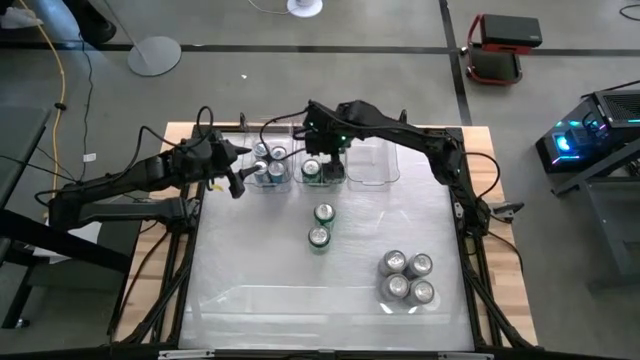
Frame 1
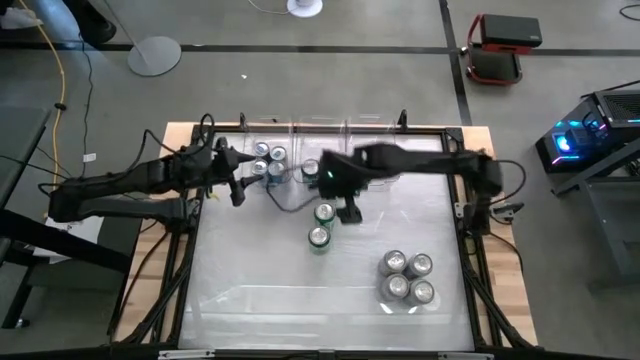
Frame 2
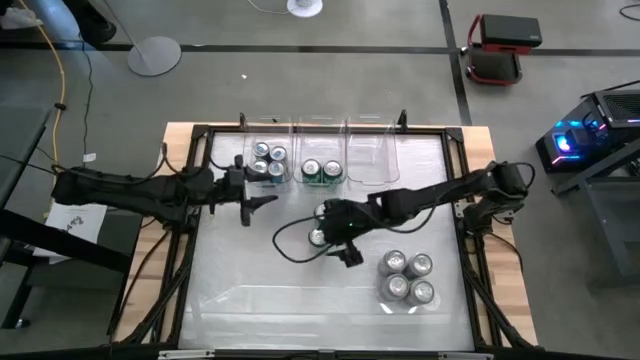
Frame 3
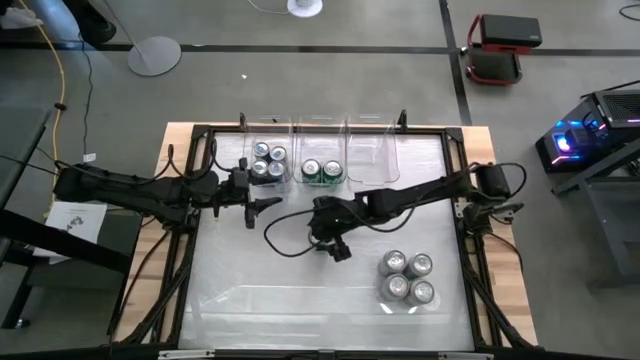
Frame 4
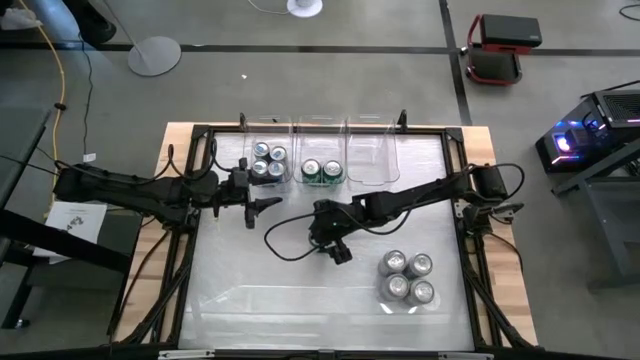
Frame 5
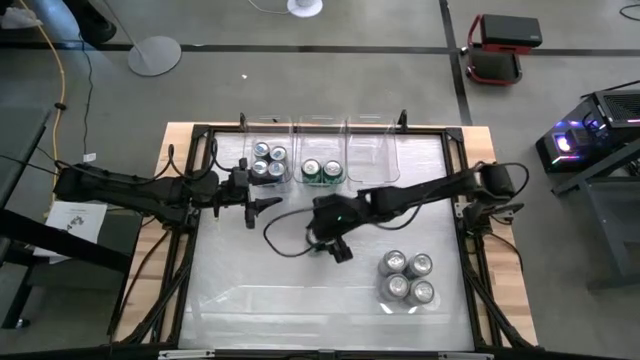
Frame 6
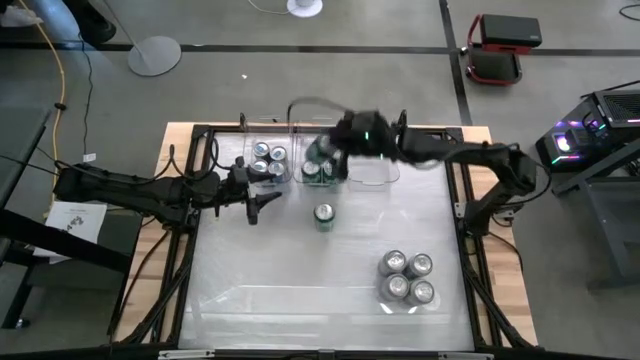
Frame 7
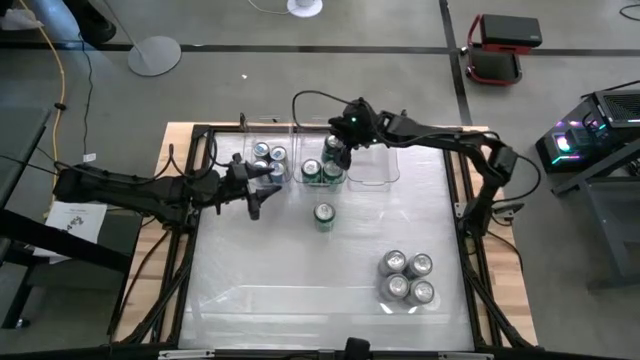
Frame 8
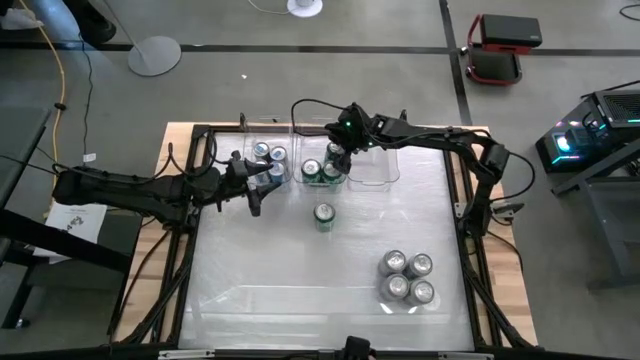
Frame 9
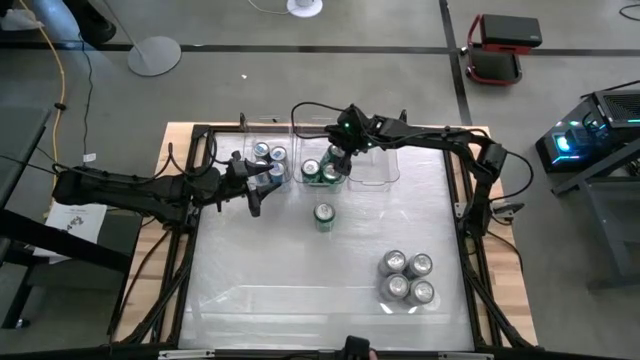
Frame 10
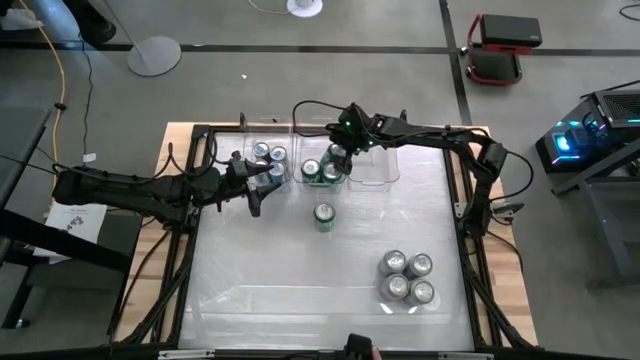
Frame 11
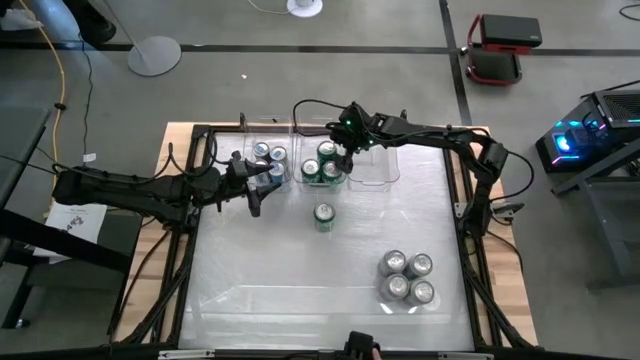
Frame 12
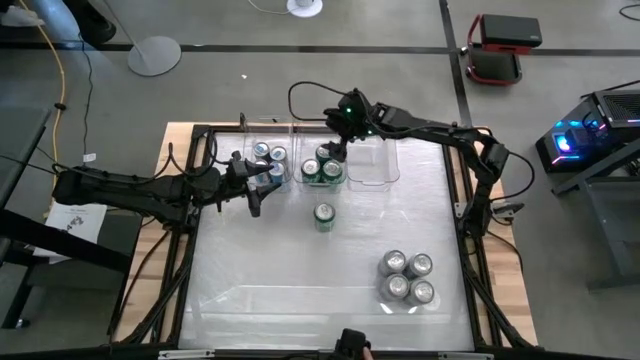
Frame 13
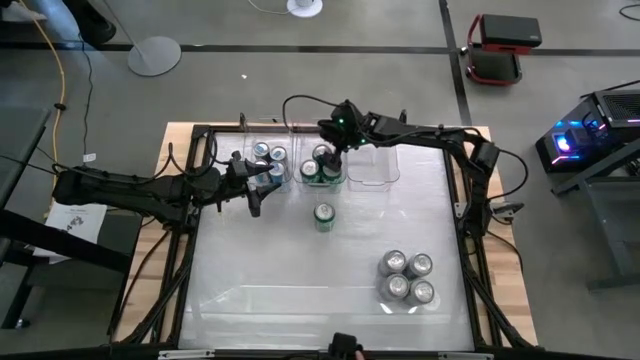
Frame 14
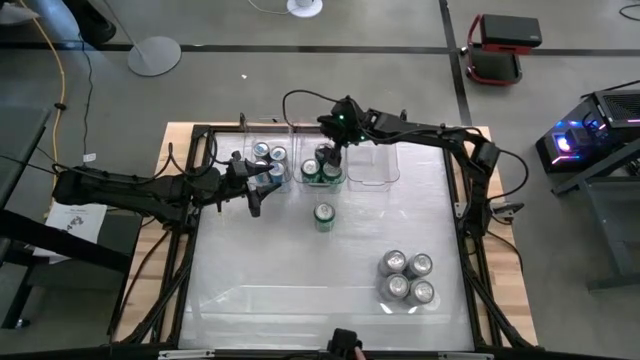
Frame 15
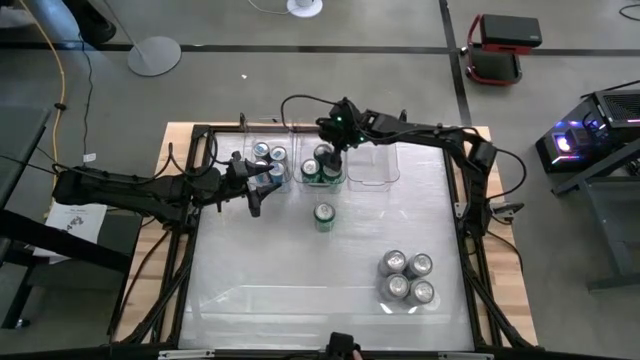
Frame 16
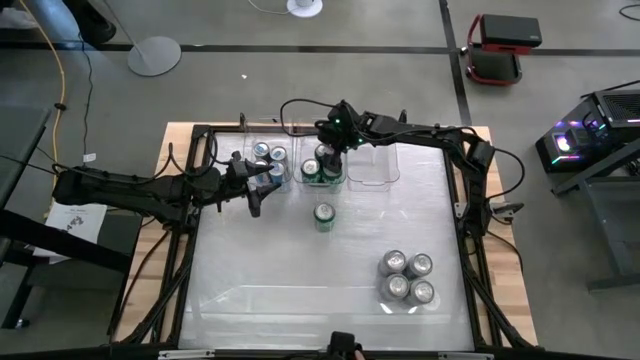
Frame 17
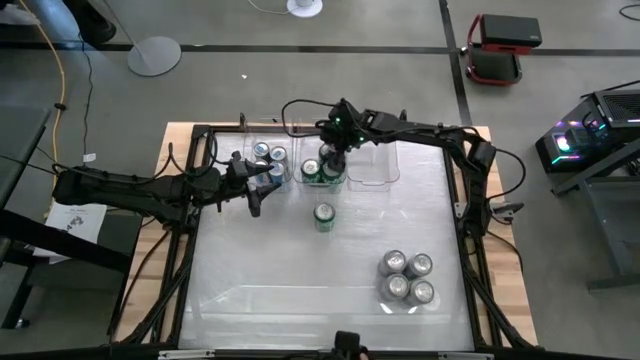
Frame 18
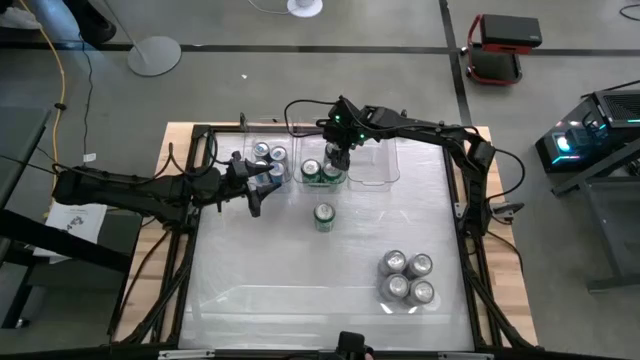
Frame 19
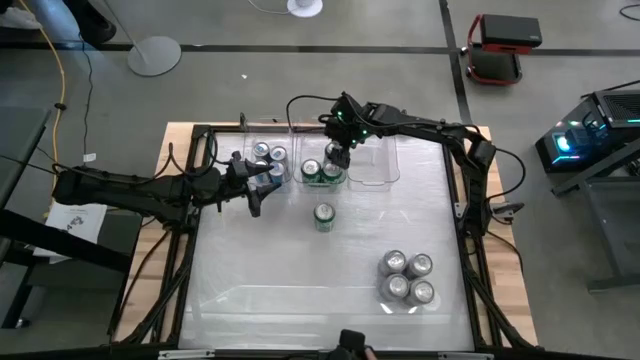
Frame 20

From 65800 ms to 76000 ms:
Task: Sort soda cans
Put the bottom green soda can into the center transparent bin

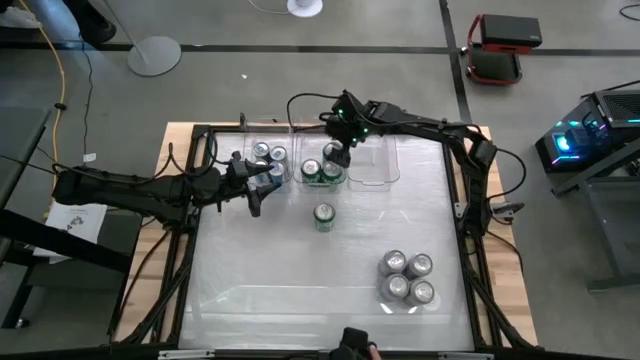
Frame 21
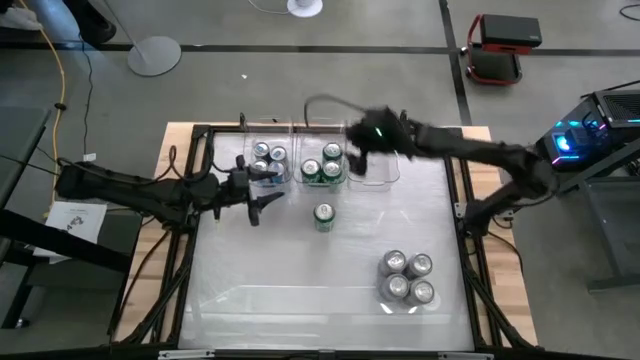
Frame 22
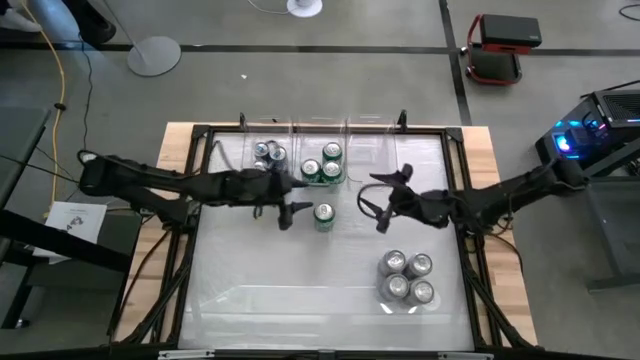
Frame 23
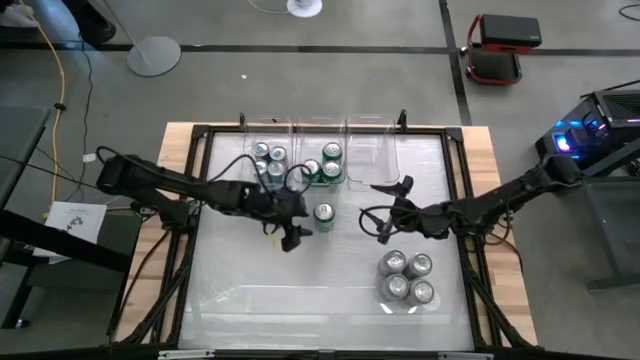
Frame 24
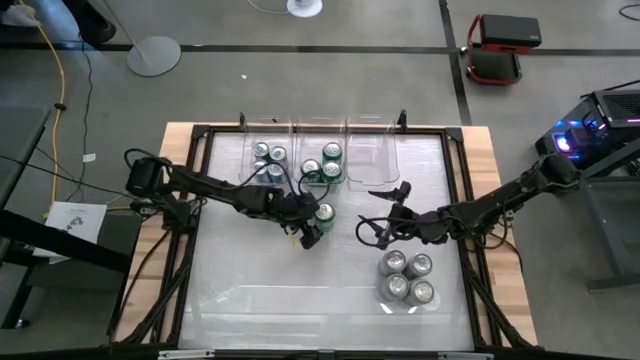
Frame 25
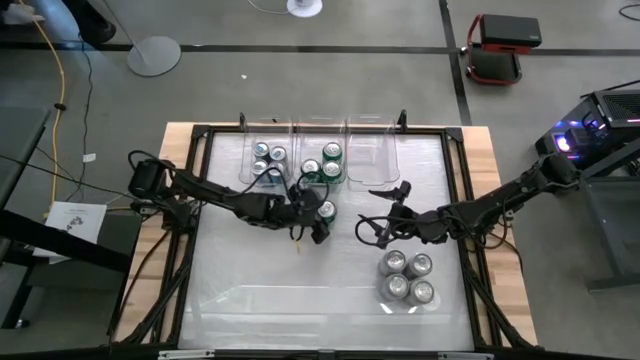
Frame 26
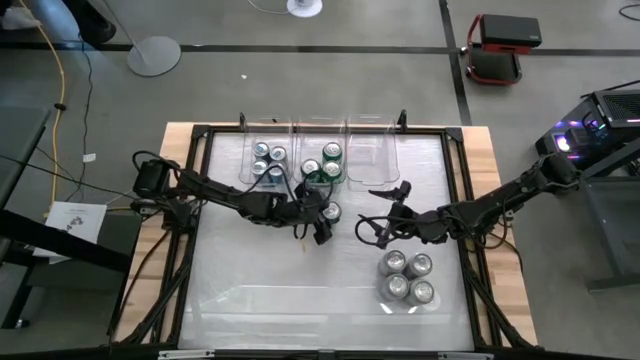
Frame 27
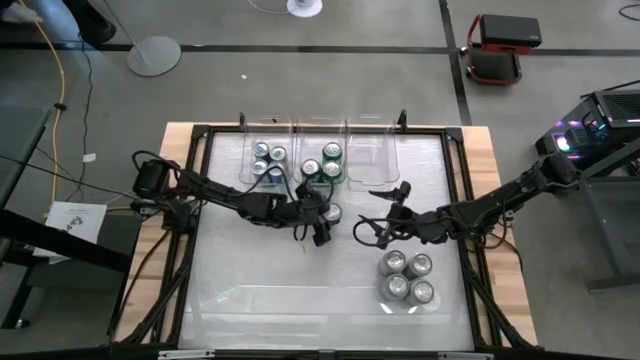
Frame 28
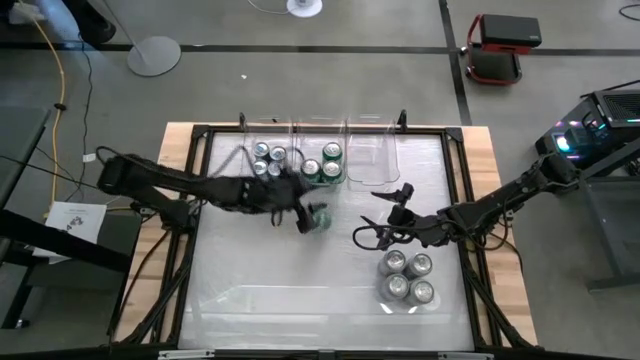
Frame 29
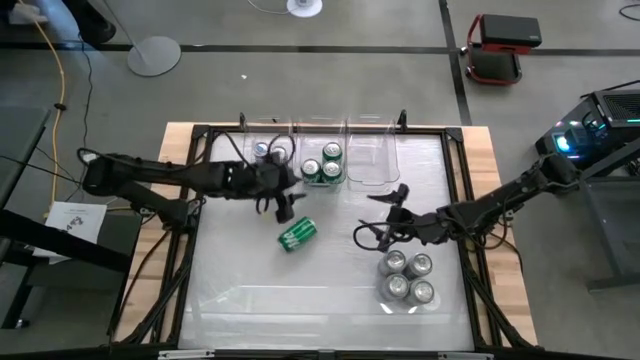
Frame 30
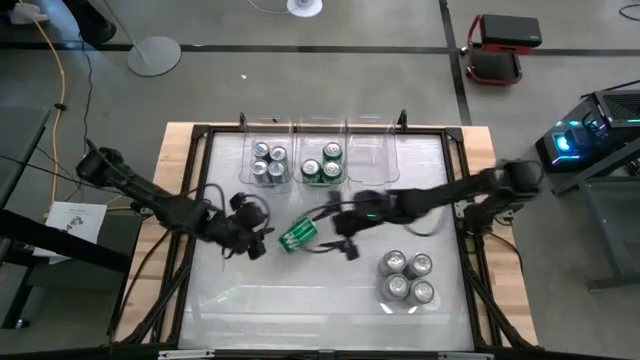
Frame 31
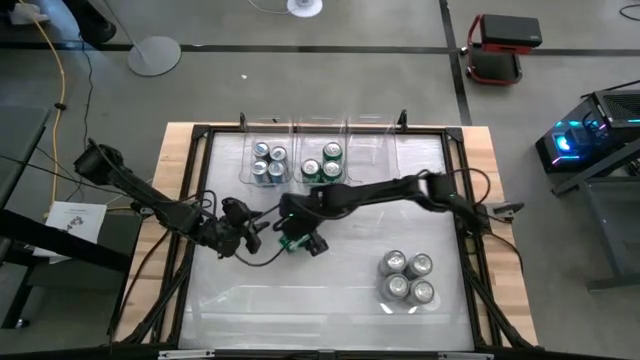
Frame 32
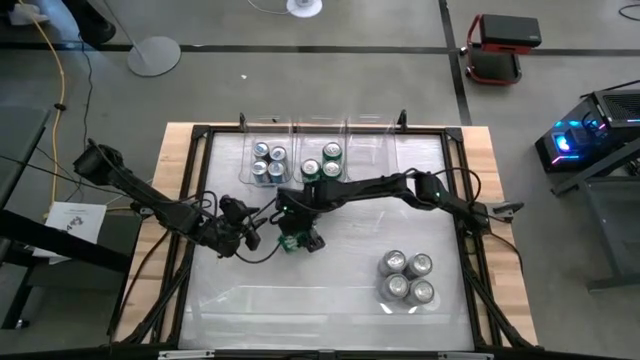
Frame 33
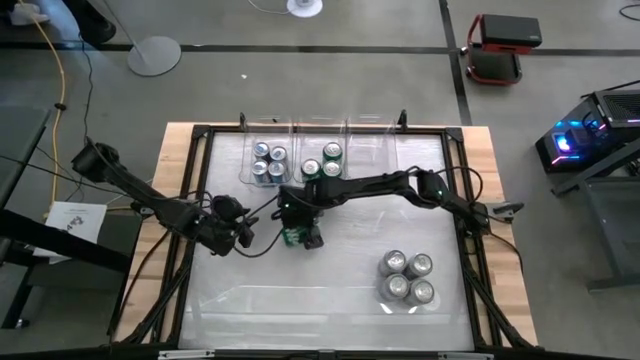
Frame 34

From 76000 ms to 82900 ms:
Put the green soda can into the center transparent bin

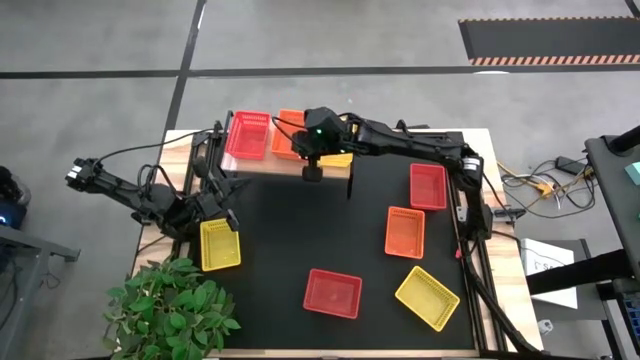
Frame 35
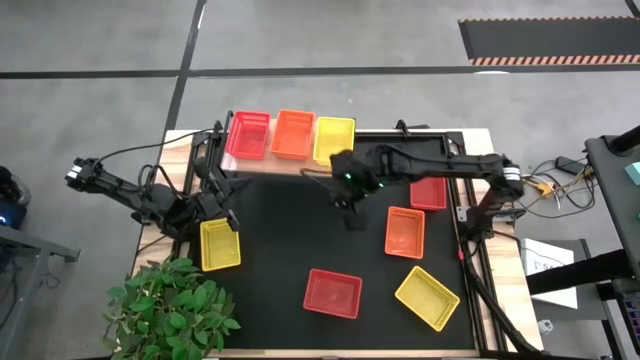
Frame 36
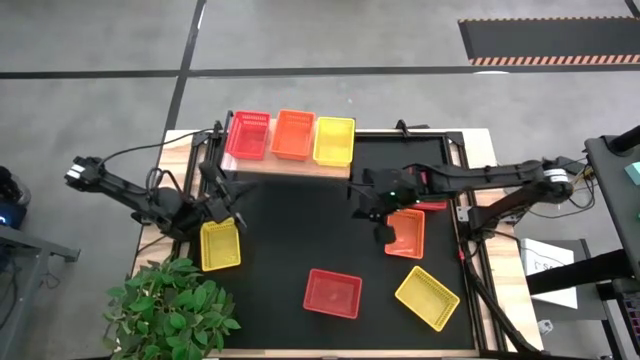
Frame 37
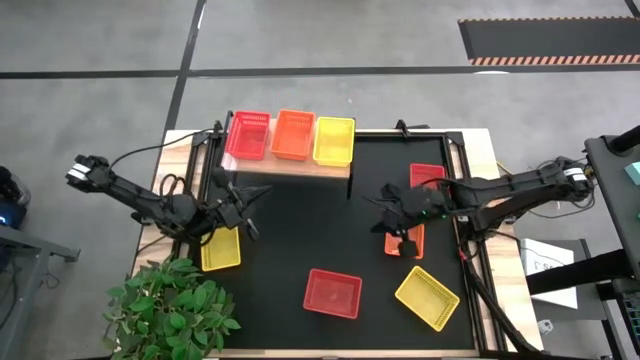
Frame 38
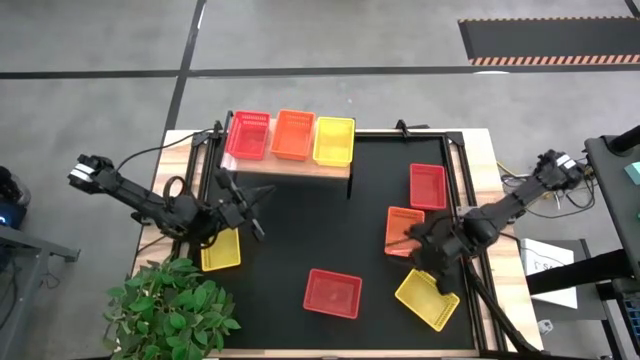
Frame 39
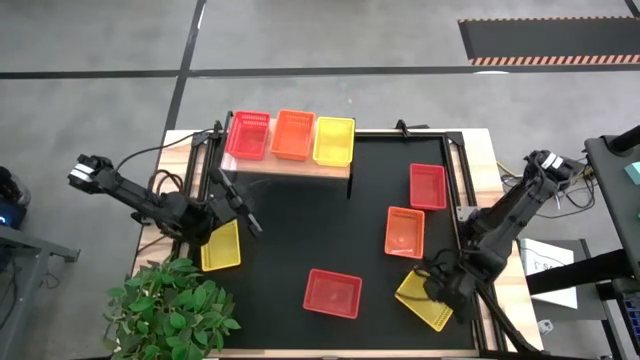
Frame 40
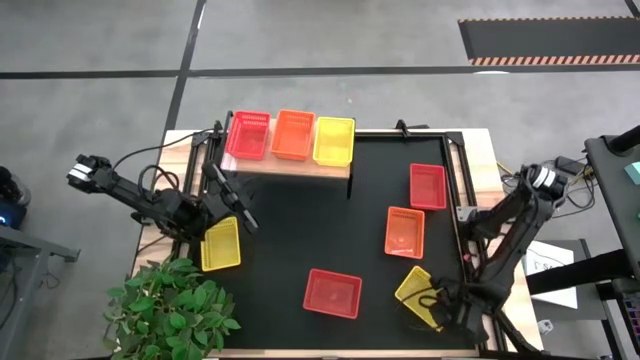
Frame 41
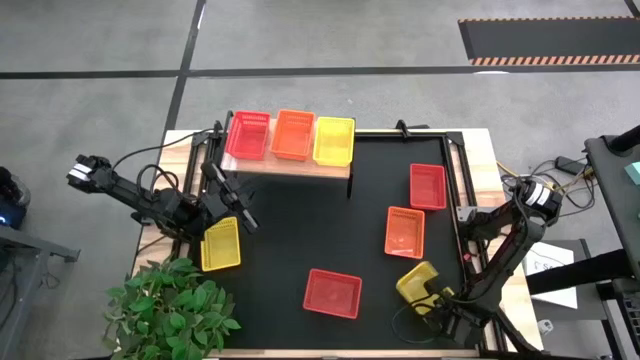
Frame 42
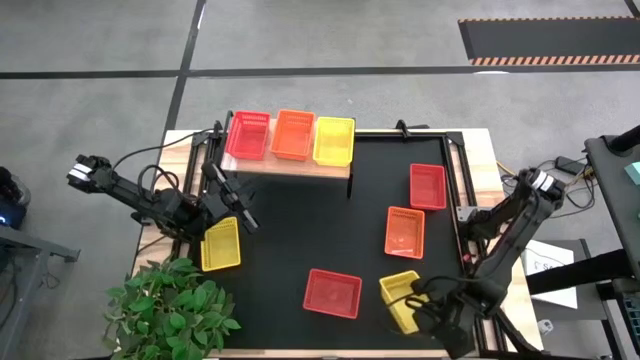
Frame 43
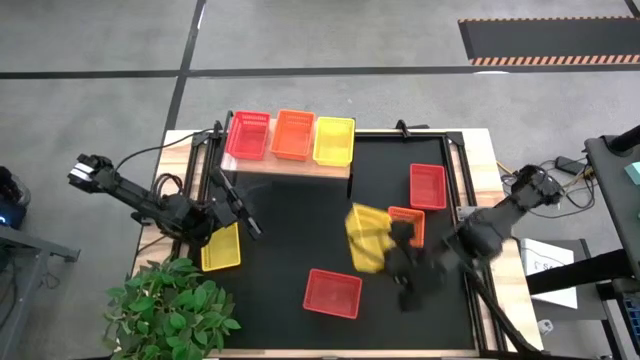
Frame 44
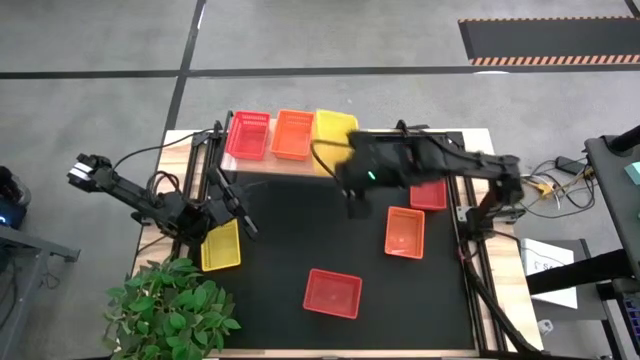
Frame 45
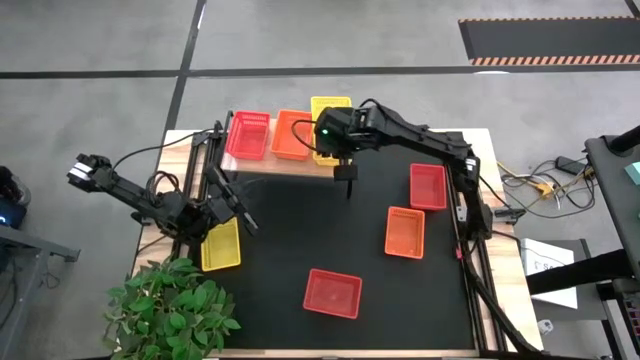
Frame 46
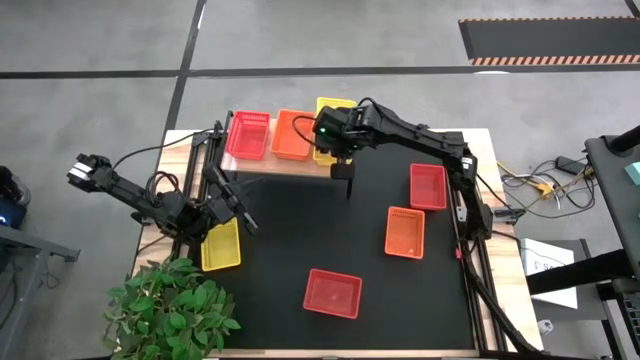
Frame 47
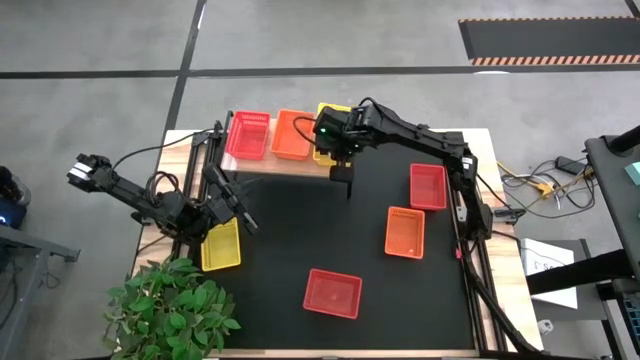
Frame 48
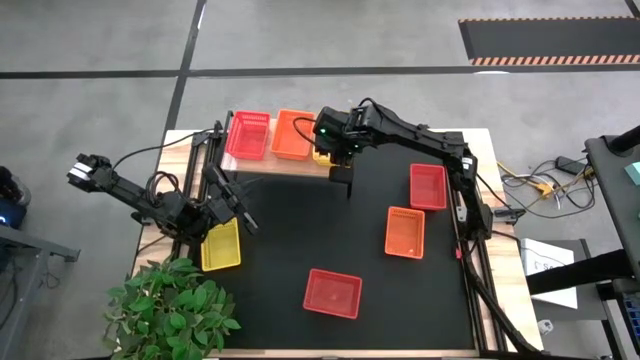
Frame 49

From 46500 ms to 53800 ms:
Task: Stack baskets on shelf by color
Stack the right yellow bin on the other yellow bin on the shelf
